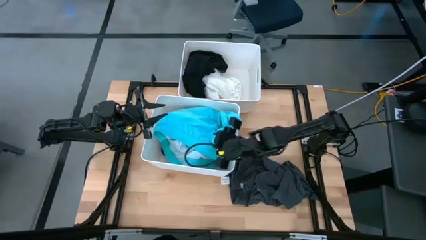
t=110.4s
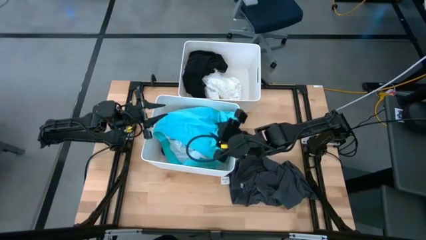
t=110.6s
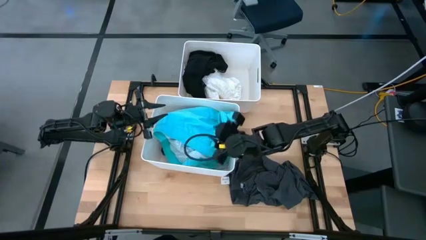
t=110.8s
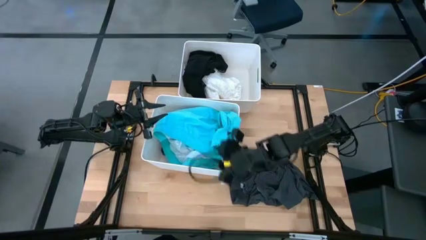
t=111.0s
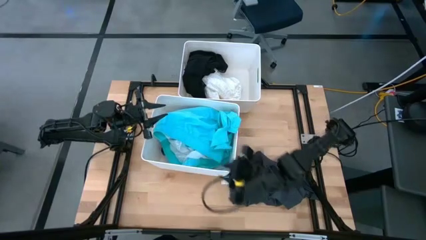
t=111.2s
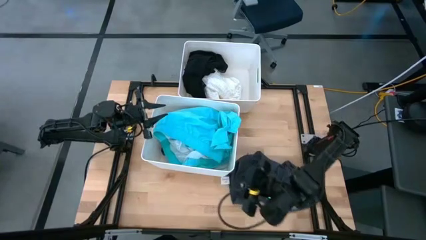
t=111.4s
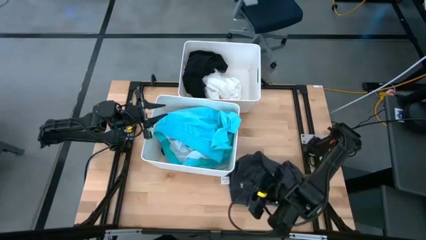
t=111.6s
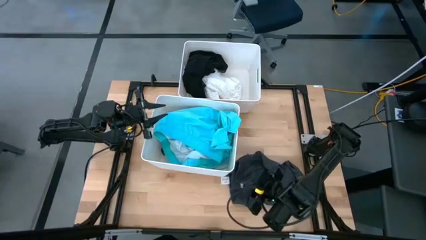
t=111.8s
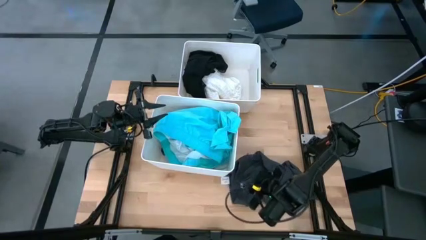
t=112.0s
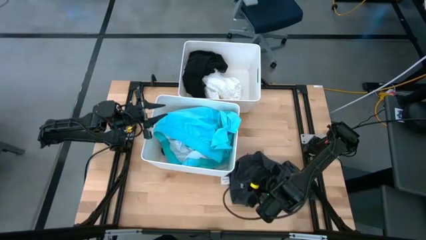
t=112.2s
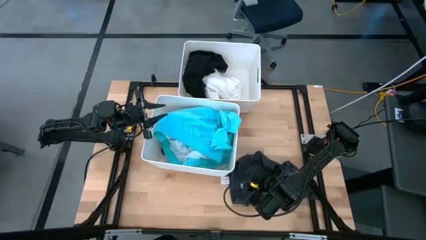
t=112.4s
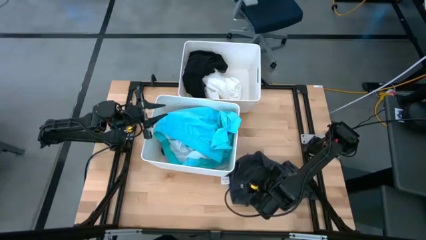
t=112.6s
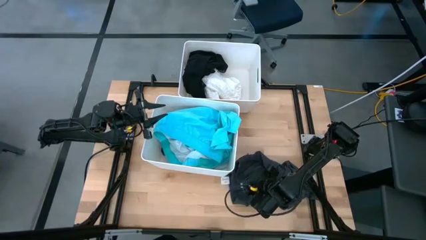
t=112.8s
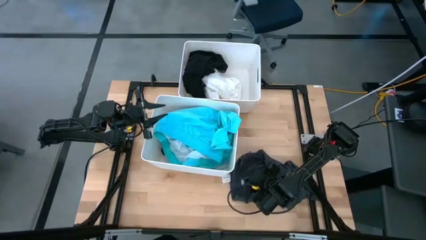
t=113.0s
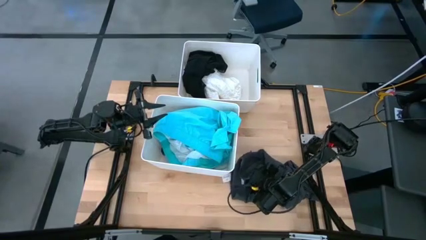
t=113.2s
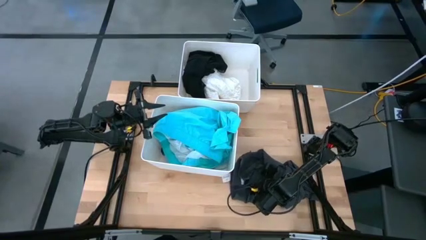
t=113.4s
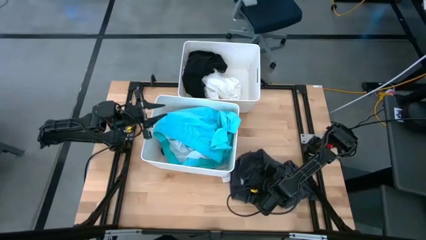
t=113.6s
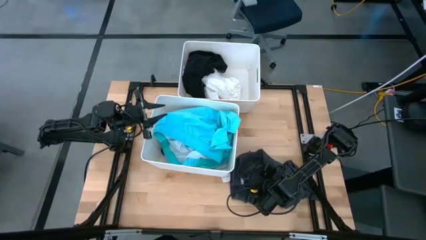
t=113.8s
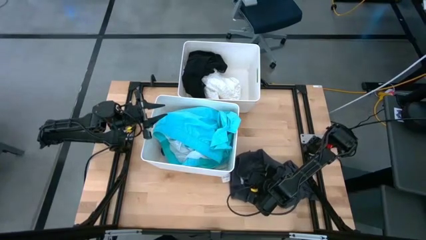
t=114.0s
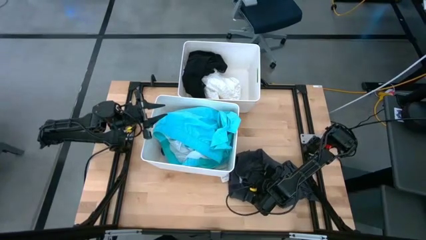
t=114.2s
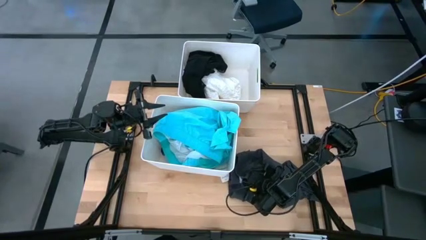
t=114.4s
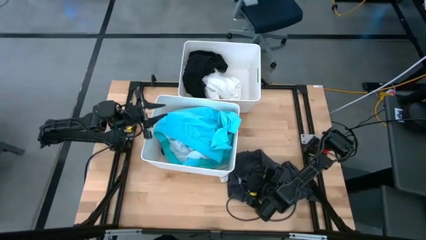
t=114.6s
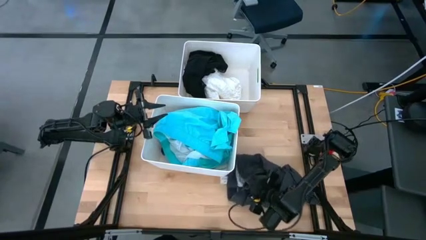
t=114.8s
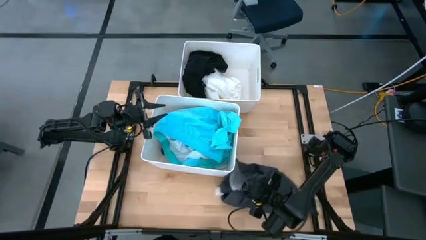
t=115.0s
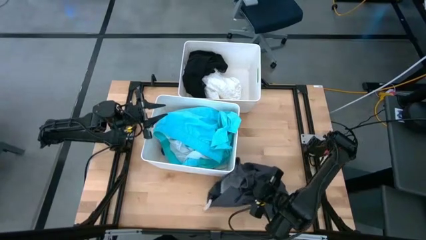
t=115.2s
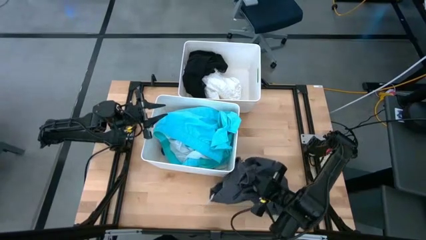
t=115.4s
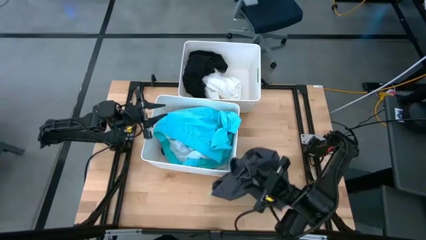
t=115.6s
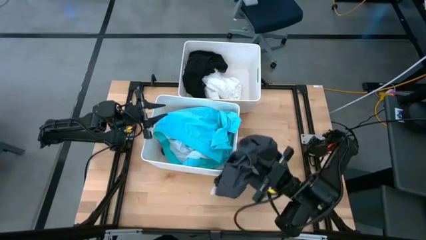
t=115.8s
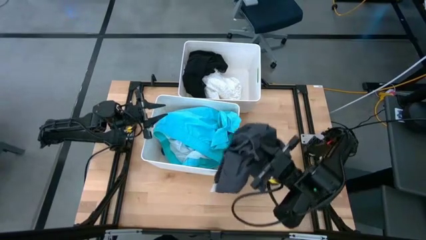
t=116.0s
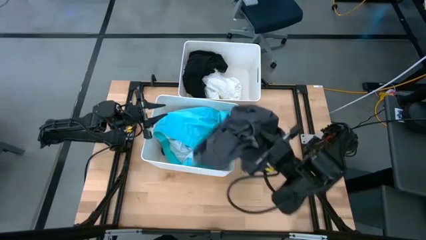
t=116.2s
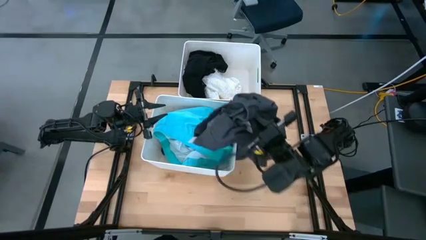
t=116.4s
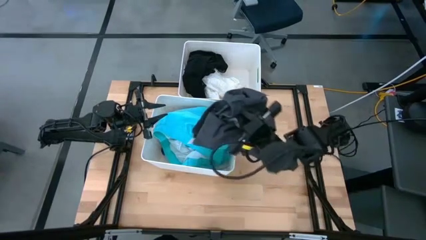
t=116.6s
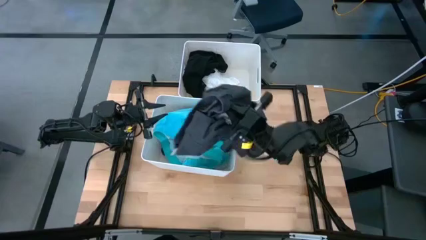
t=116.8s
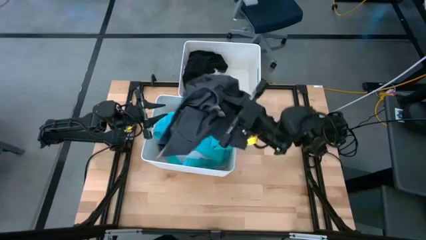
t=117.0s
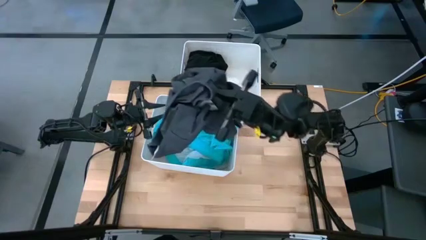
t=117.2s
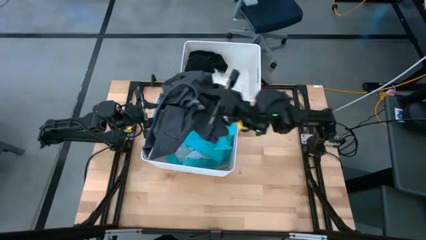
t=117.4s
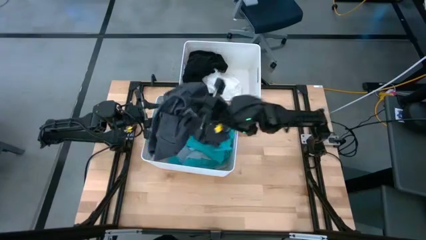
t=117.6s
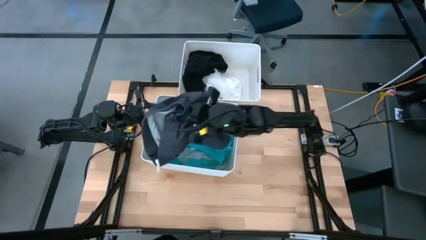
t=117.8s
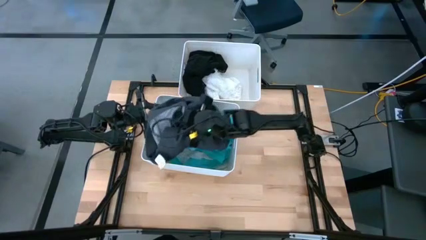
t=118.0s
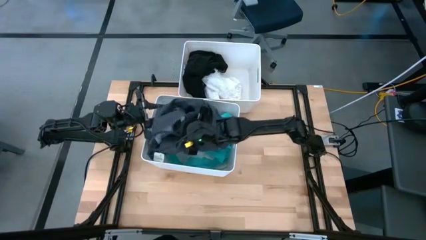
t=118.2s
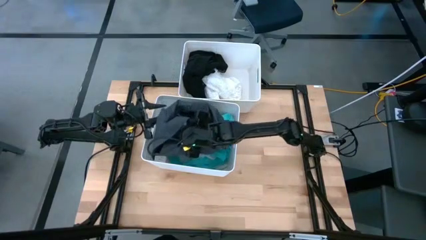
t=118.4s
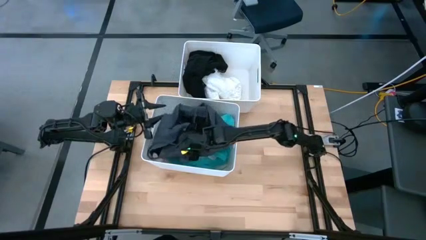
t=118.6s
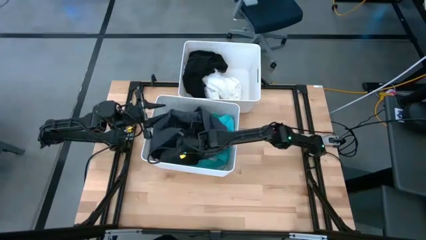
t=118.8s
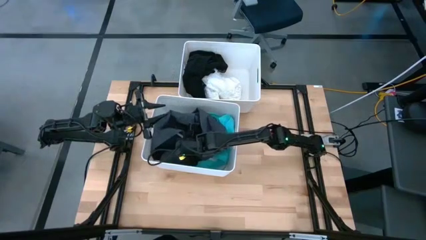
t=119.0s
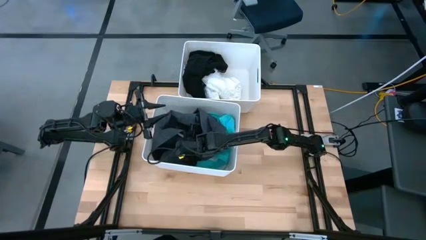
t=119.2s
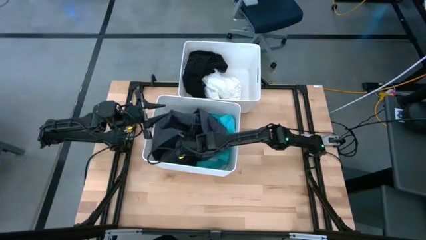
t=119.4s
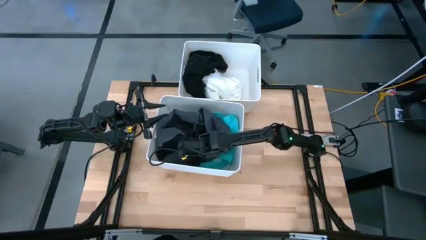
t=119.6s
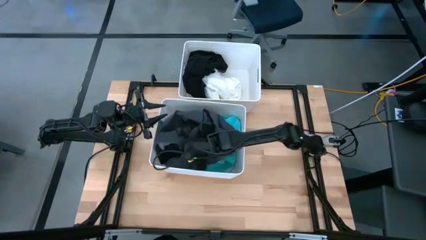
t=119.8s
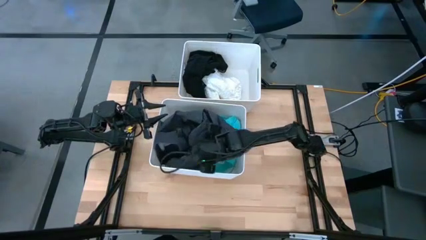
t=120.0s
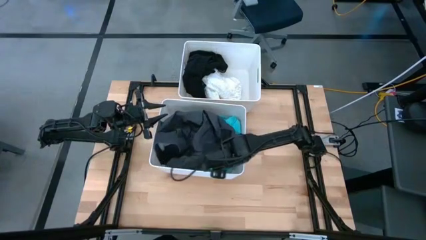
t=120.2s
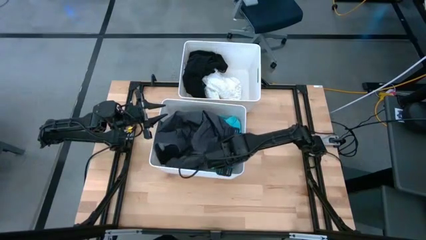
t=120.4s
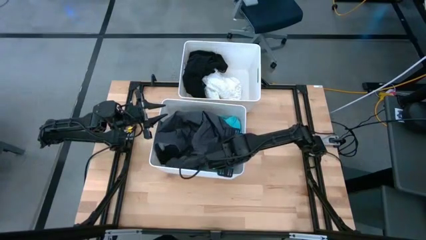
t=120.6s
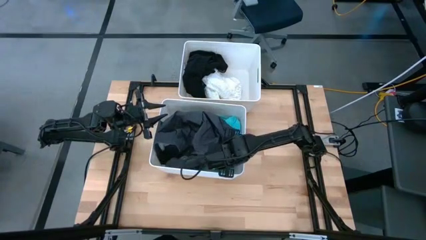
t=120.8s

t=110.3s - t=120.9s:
Task: Sort clothes
Put the black cargo shorts into the bottom white bin

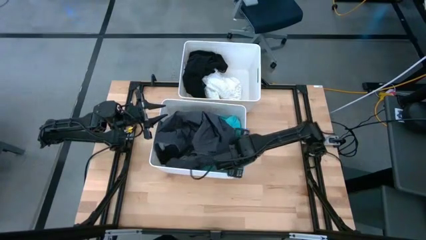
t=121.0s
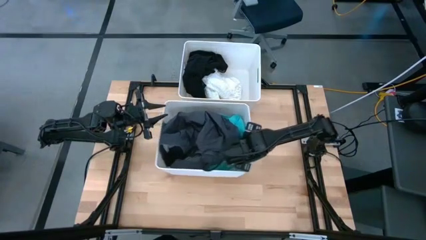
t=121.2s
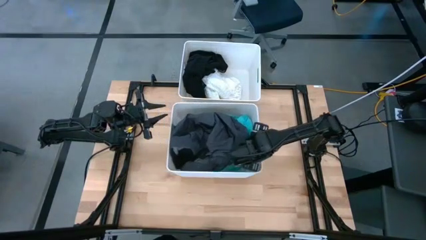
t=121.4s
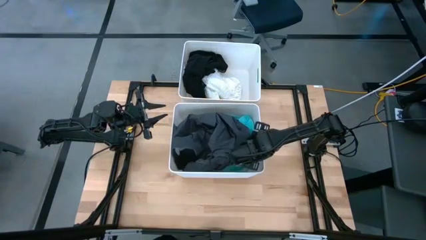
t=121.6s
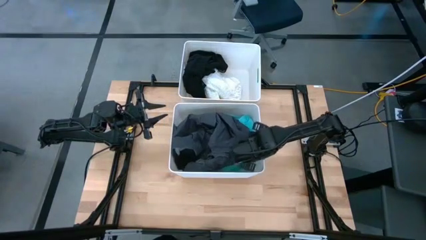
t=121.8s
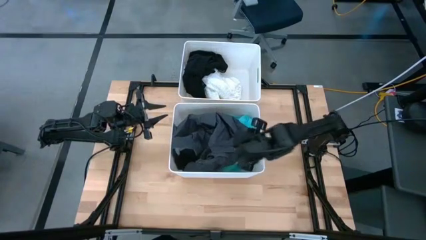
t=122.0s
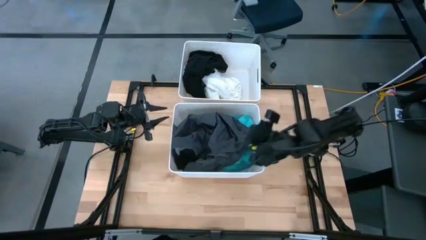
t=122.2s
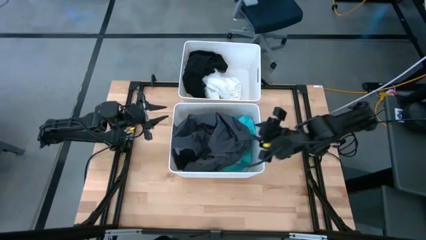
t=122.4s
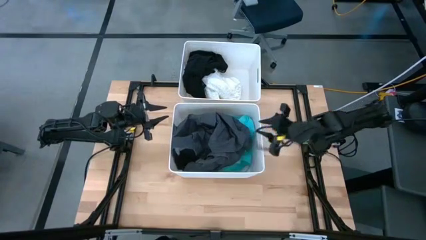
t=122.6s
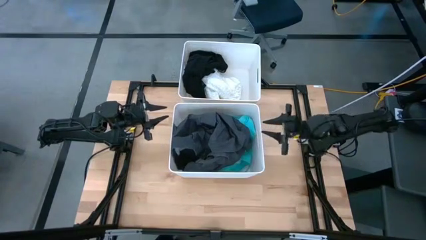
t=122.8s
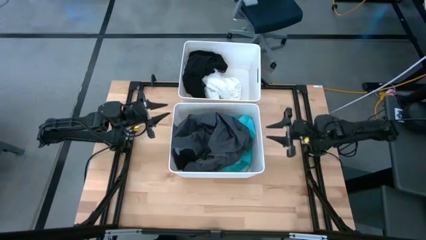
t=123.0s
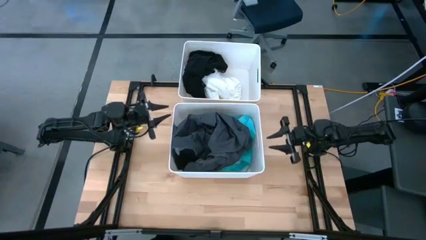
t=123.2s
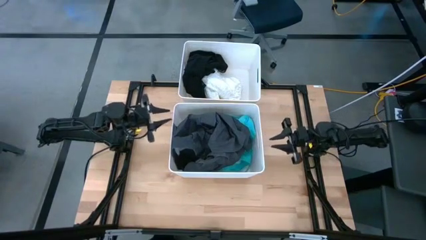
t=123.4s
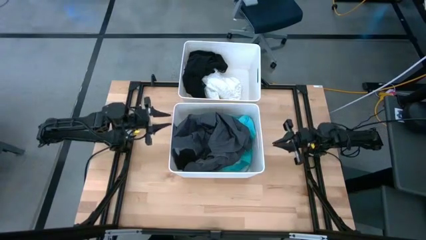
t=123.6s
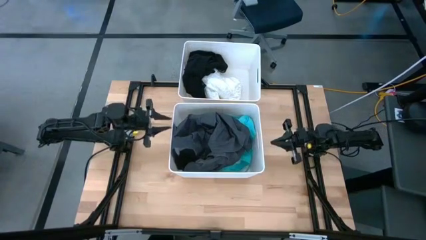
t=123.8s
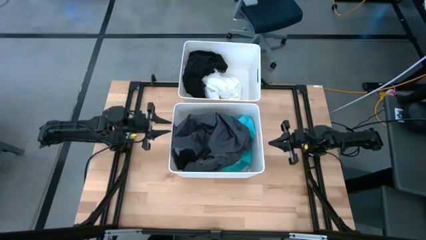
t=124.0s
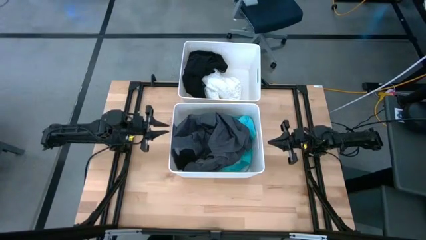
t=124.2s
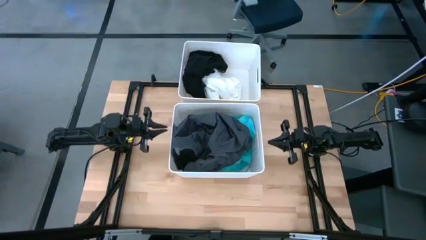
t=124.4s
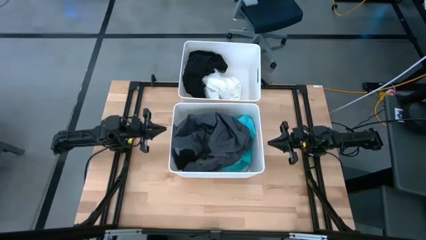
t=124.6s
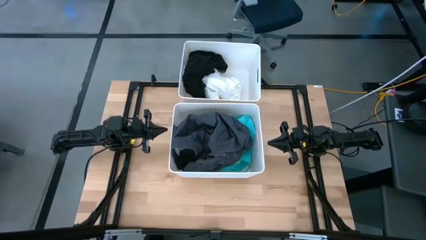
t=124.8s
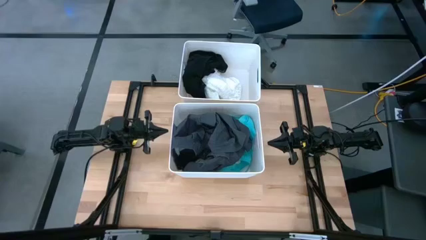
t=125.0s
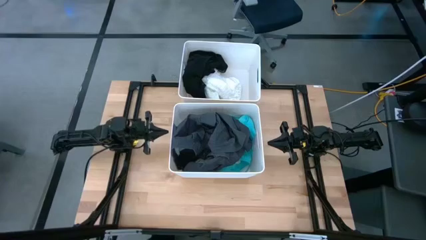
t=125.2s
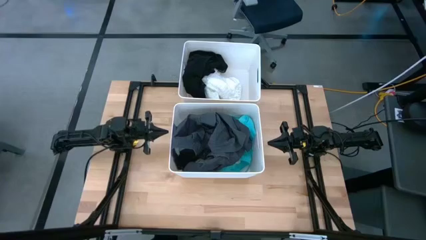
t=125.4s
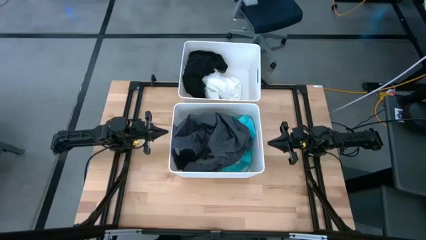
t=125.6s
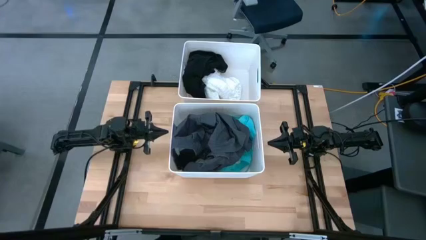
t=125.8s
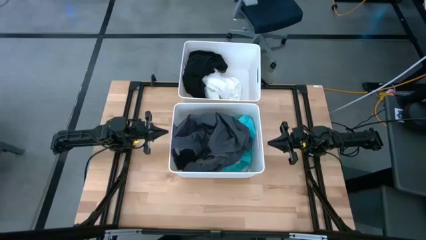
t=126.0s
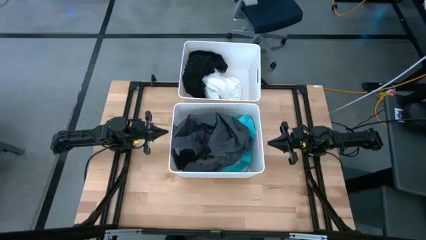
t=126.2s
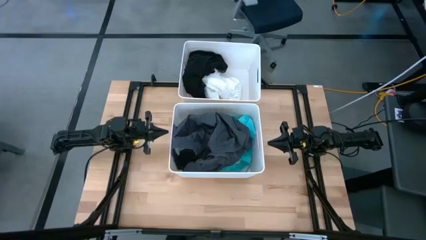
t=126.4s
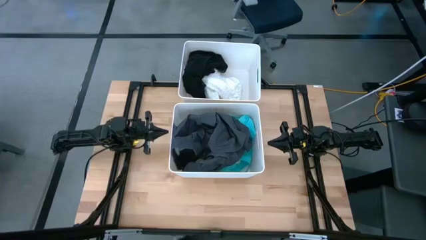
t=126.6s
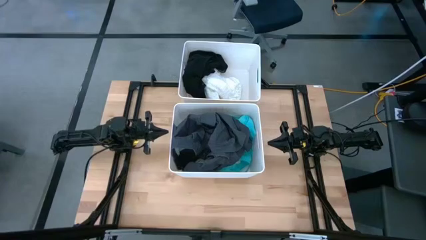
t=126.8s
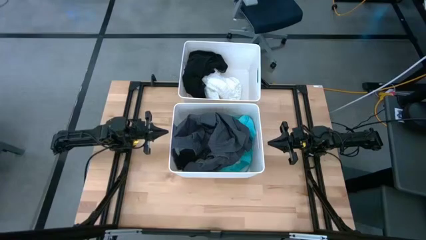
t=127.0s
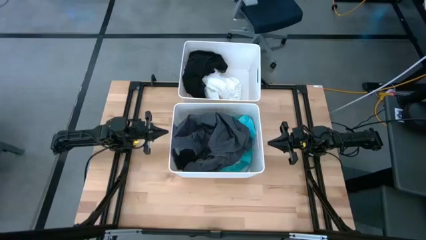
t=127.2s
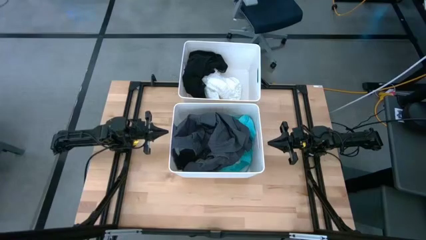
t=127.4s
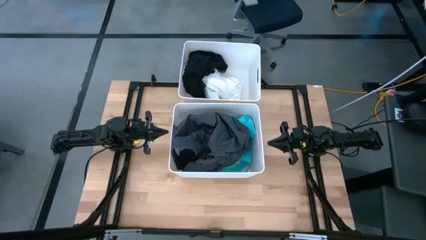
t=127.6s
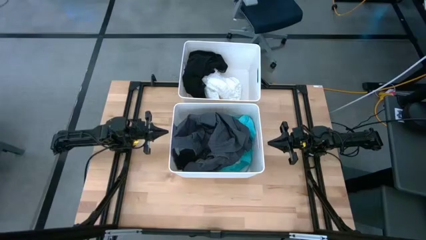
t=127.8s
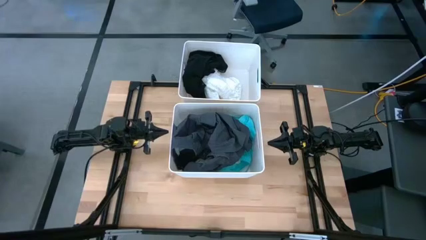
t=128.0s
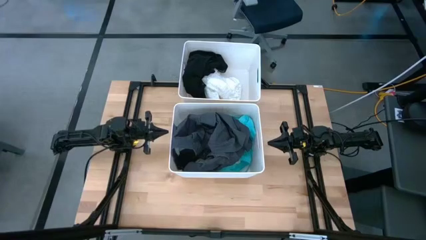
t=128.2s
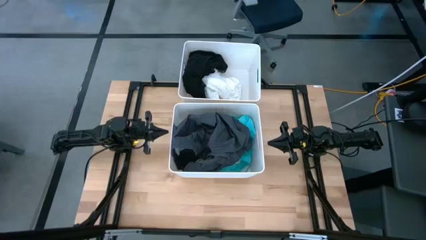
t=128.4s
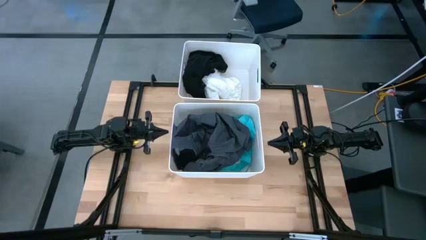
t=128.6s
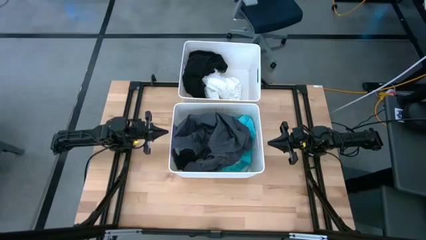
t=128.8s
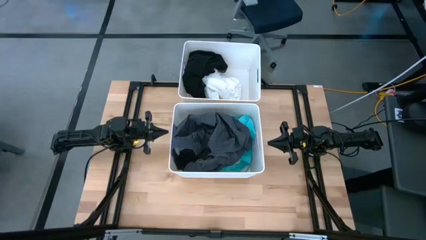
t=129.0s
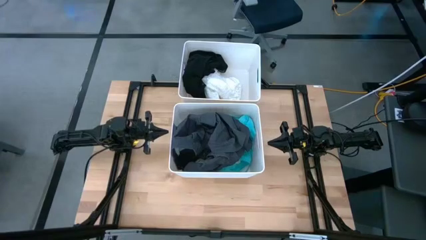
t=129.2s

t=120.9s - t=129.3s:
Return to Home Position
